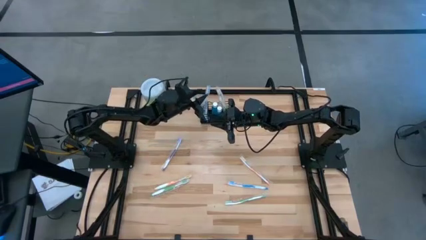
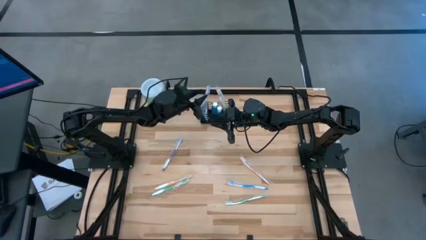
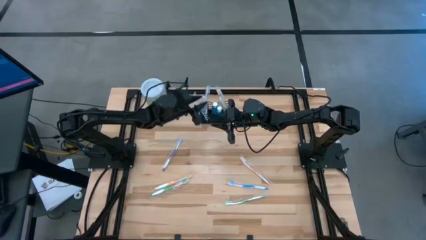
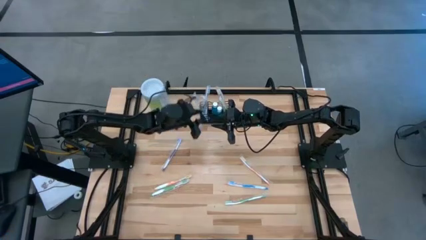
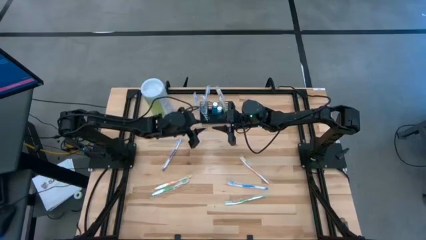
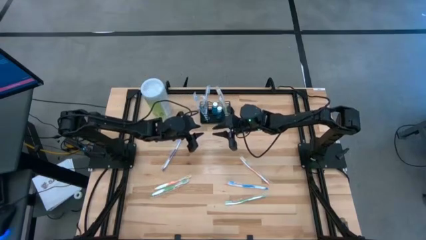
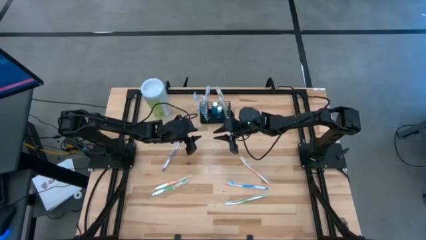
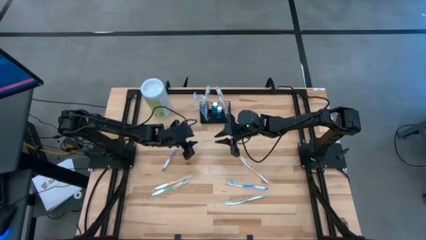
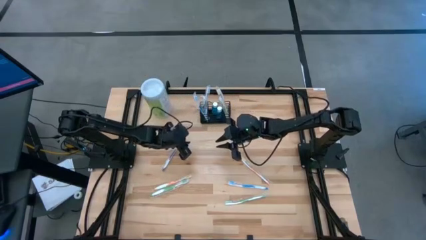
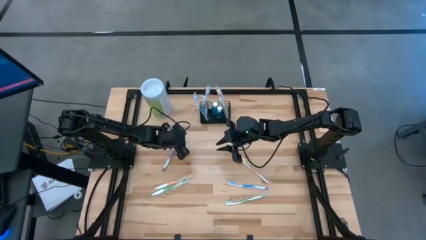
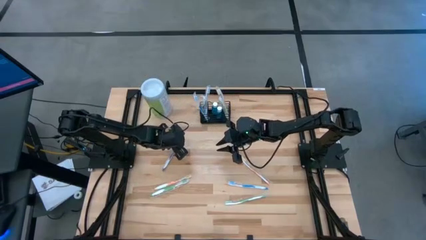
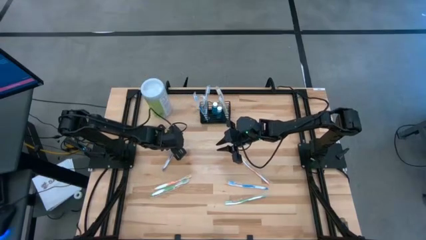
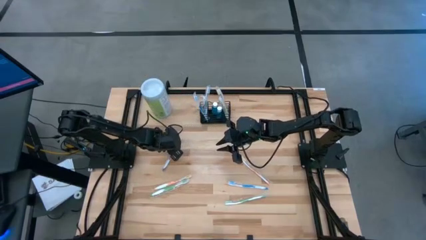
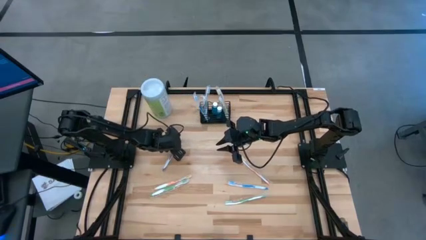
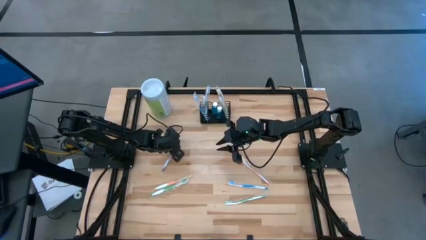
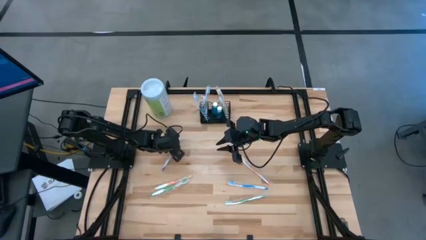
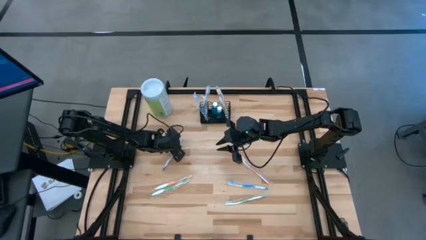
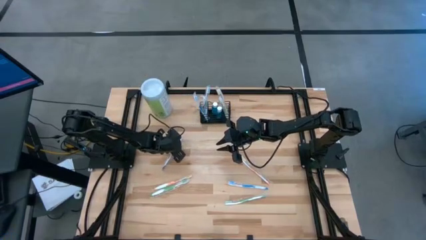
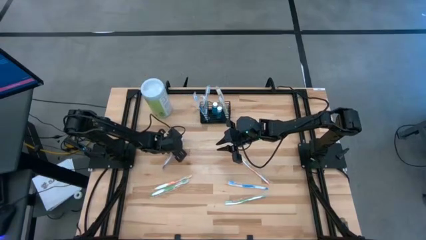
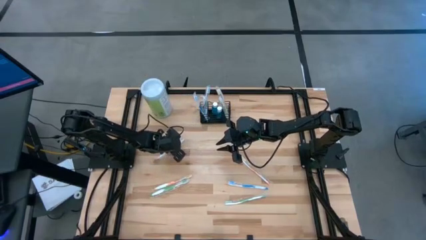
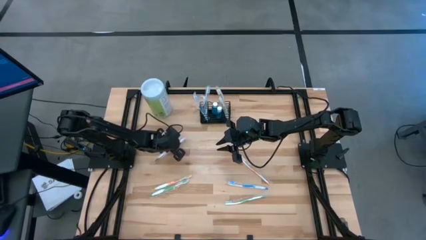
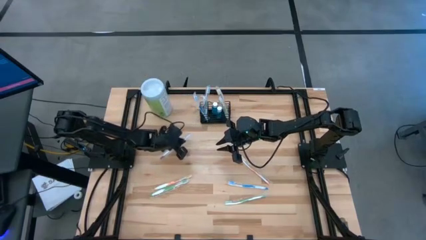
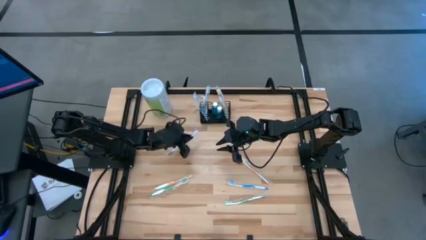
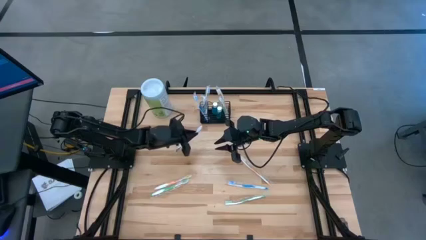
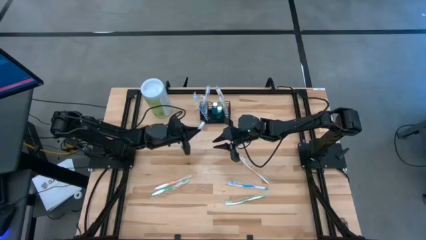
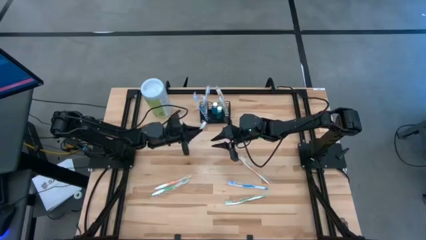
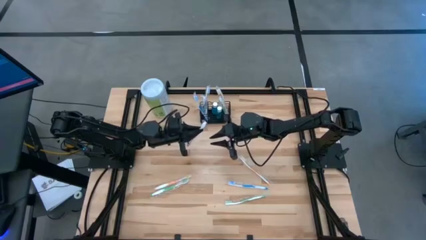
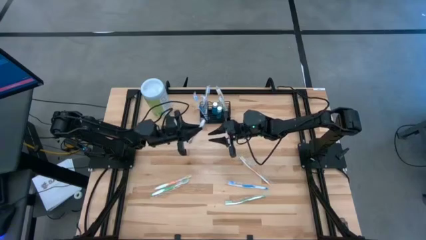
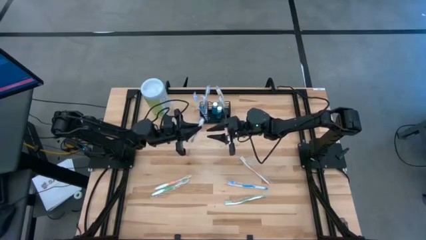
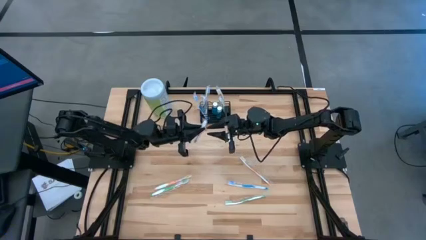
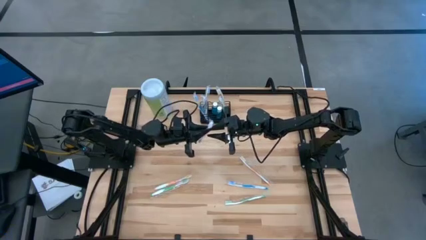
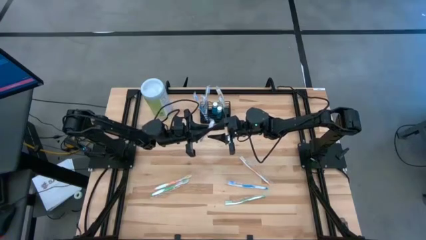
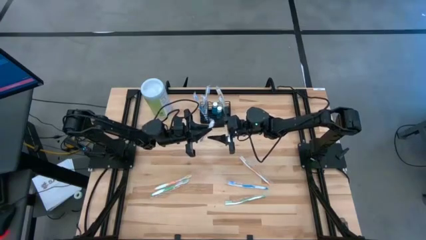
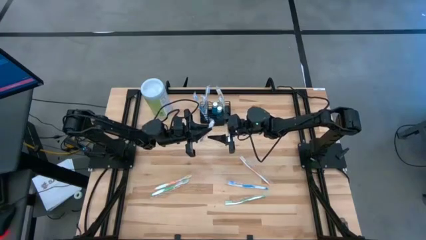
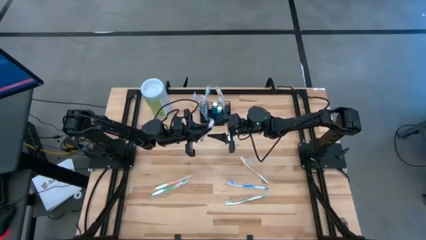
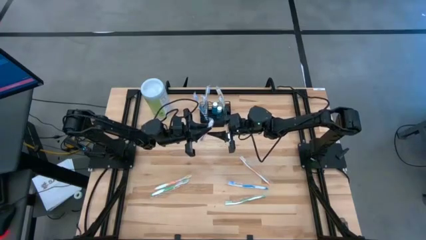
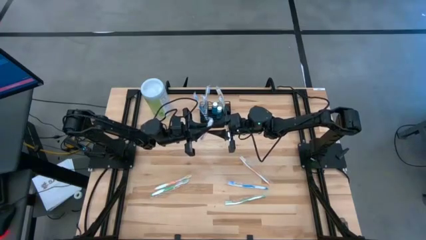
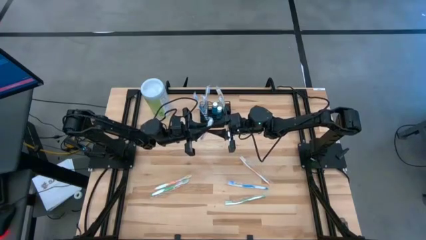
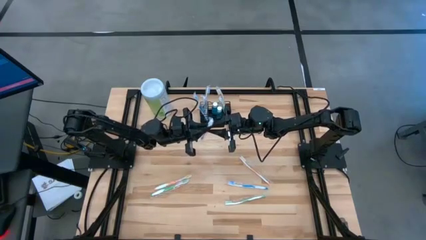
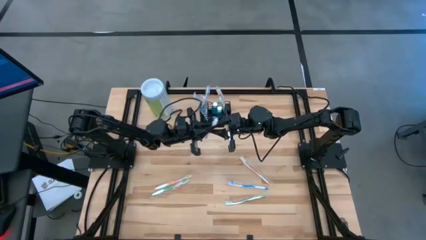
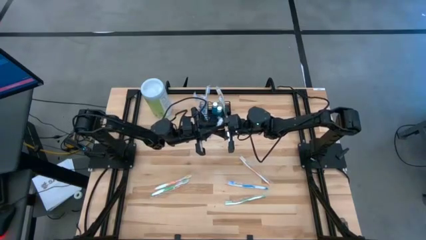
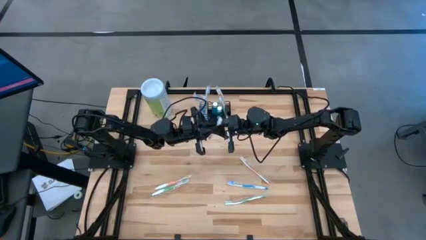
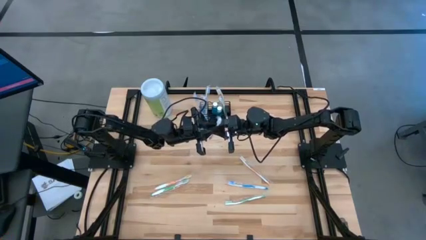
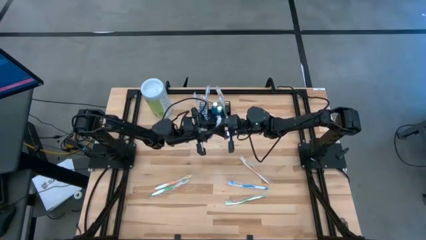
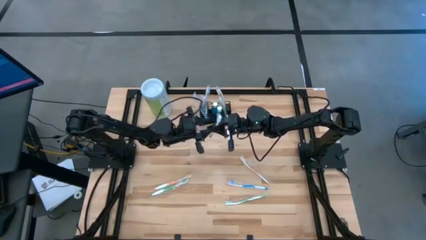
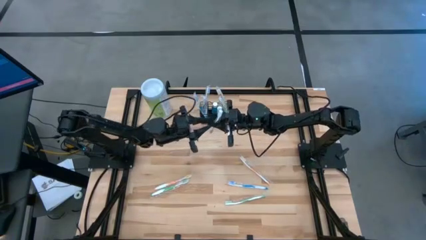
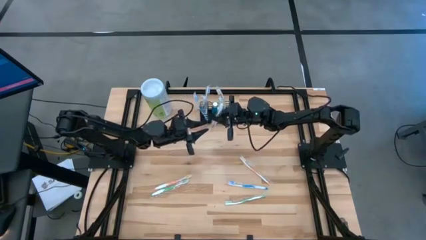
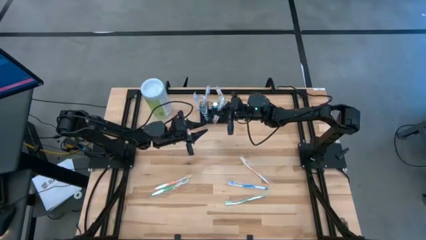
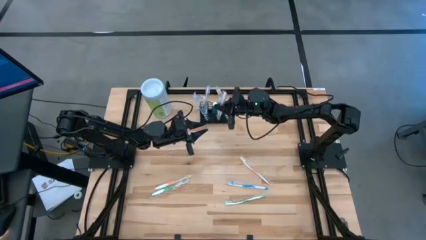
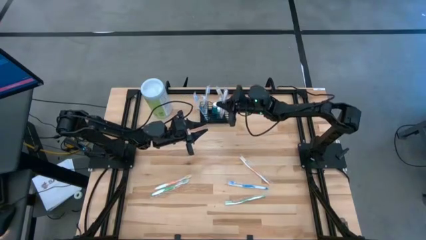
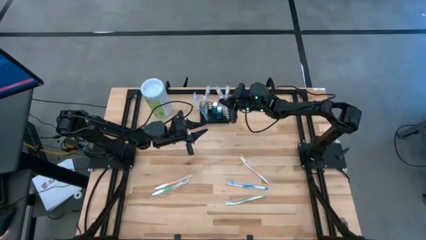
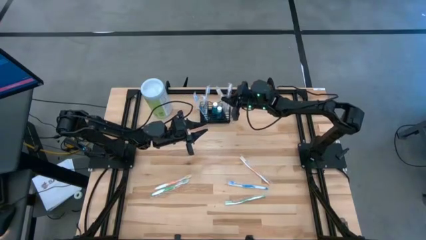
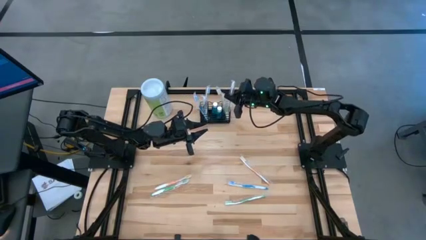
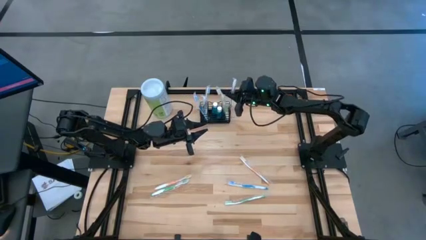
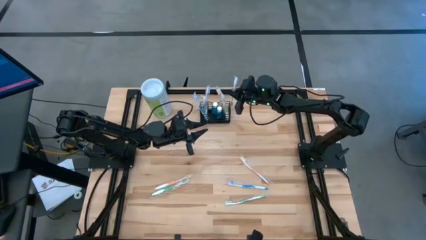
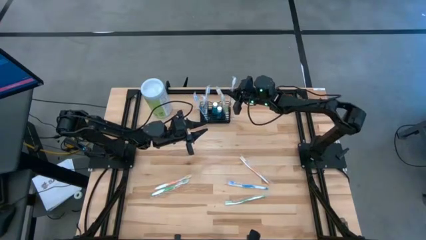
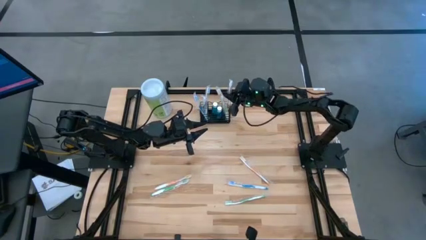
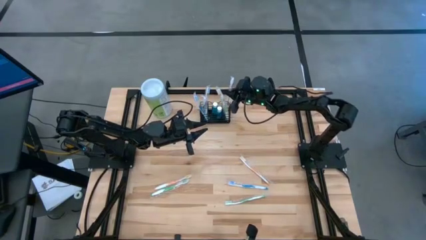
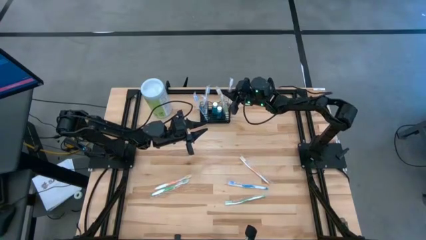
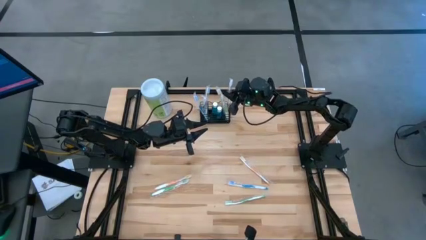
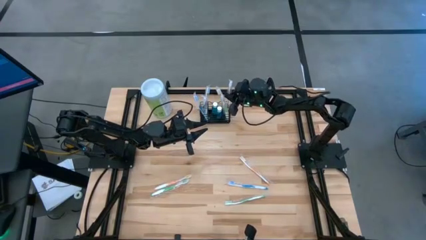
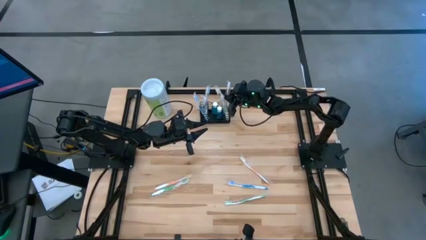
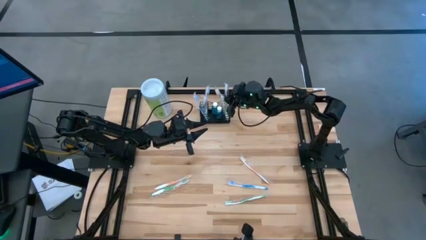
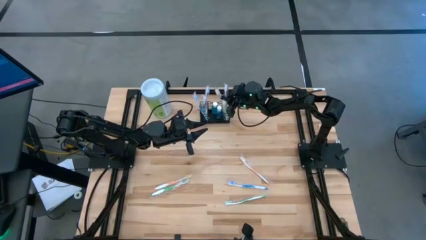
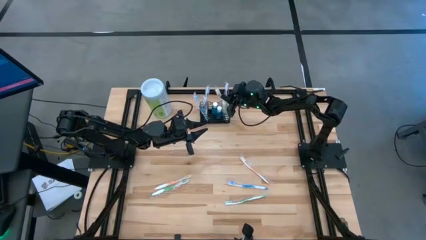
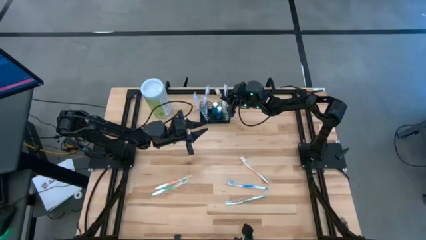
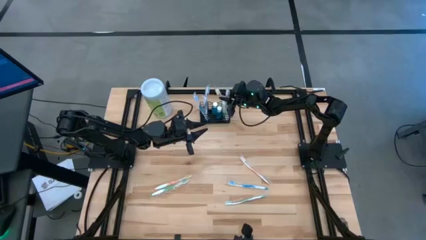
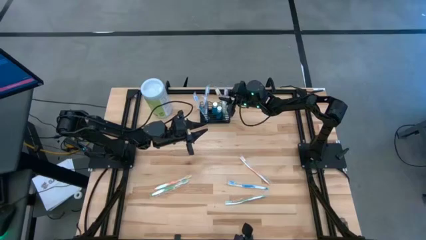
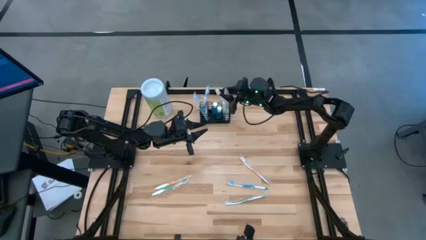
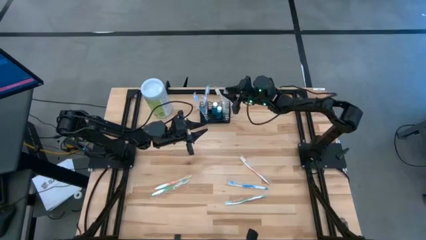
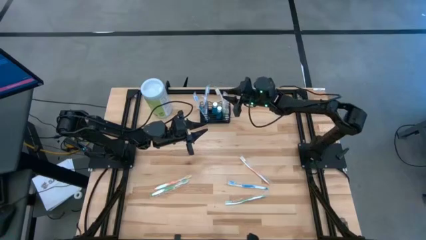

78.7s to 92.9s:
Task: Pick & Place toothbrushing station
Put the purple toothbrush into the black wire organizer
